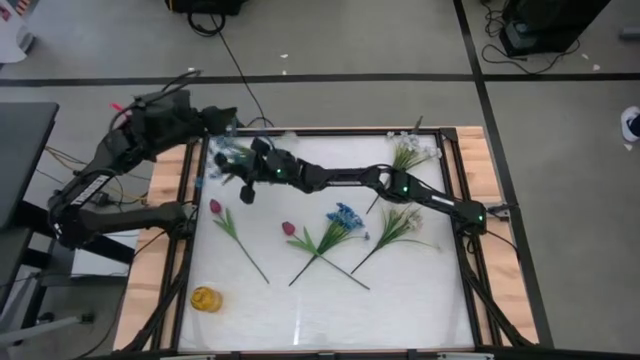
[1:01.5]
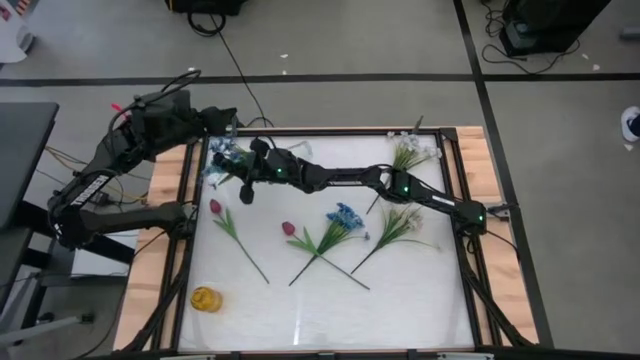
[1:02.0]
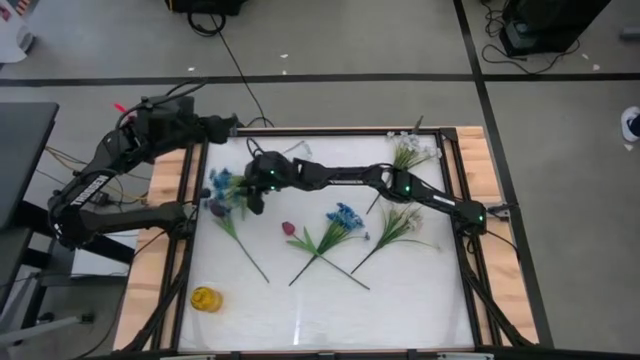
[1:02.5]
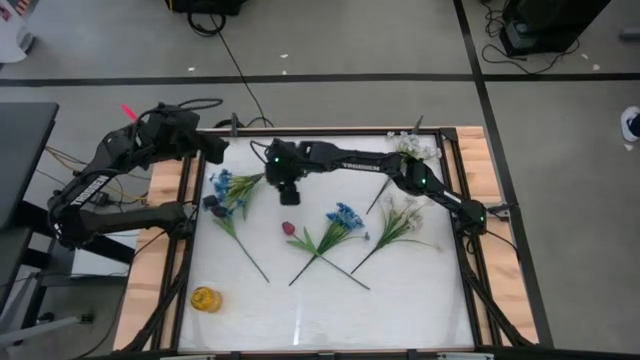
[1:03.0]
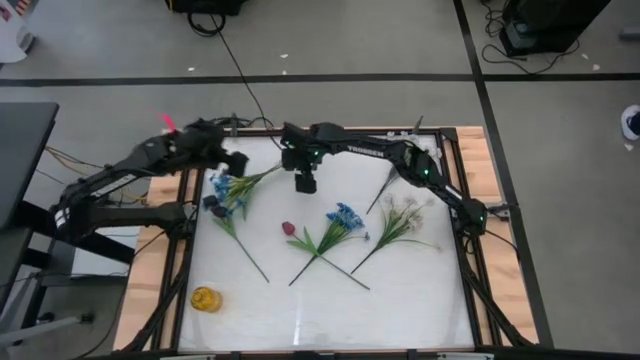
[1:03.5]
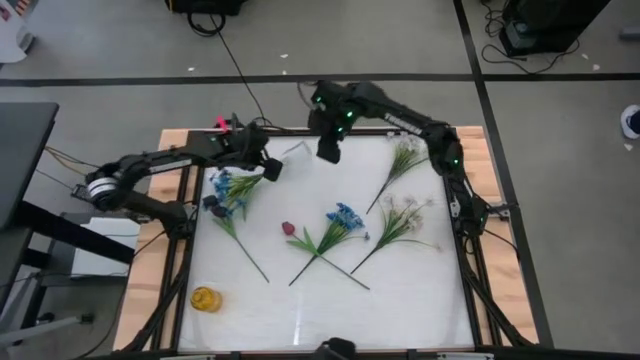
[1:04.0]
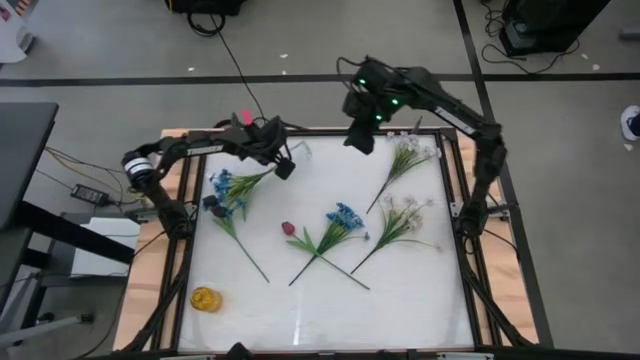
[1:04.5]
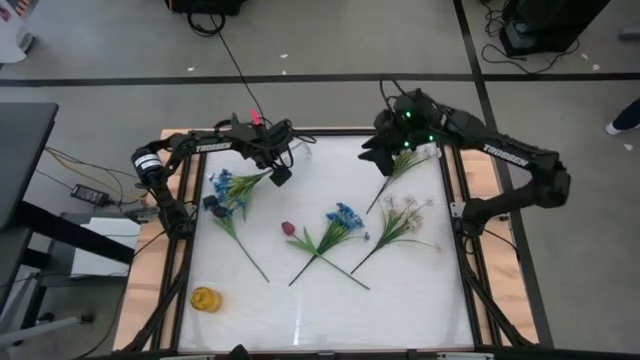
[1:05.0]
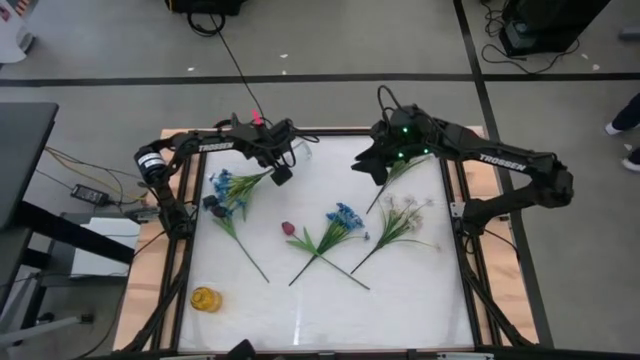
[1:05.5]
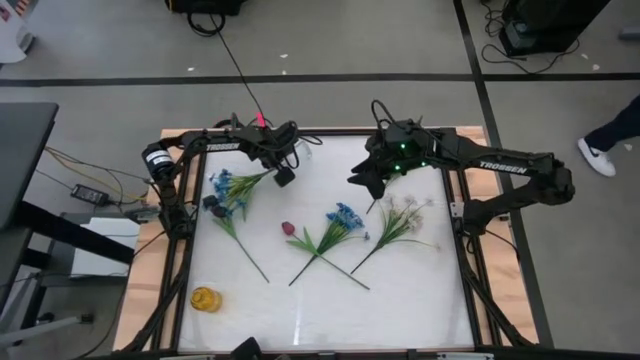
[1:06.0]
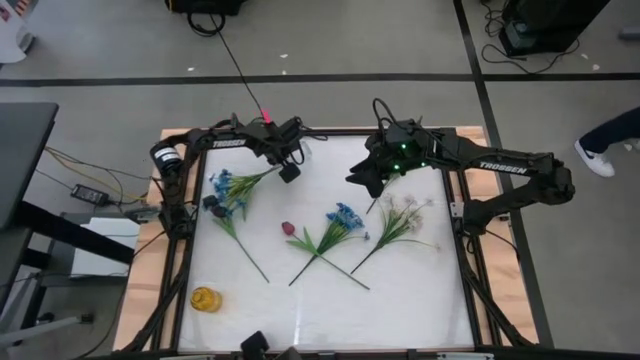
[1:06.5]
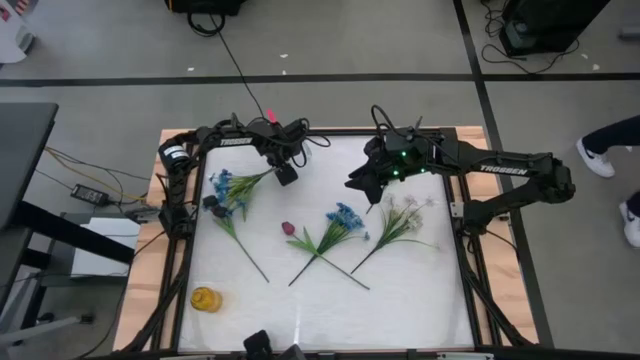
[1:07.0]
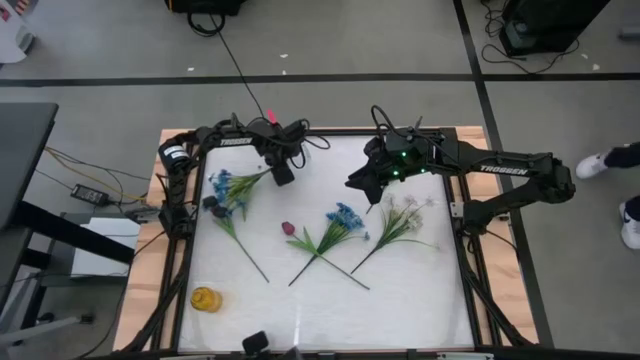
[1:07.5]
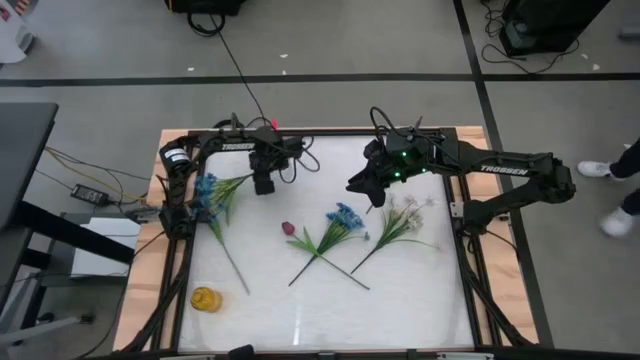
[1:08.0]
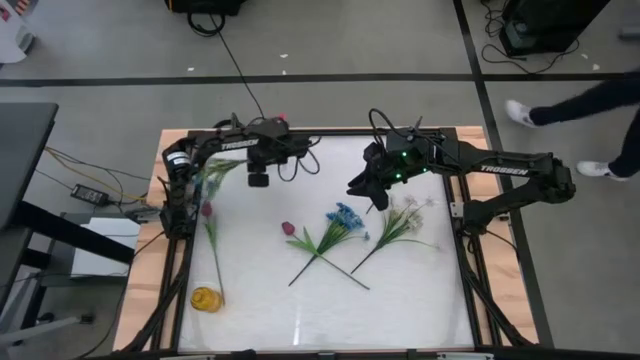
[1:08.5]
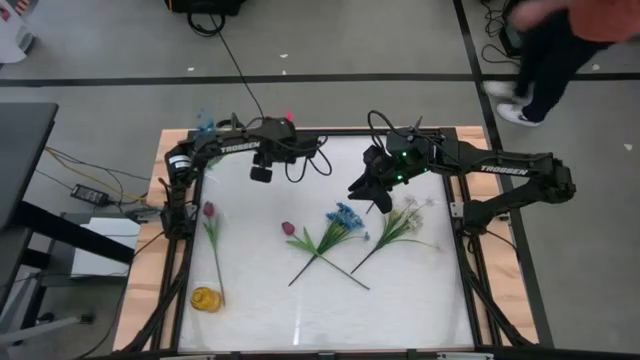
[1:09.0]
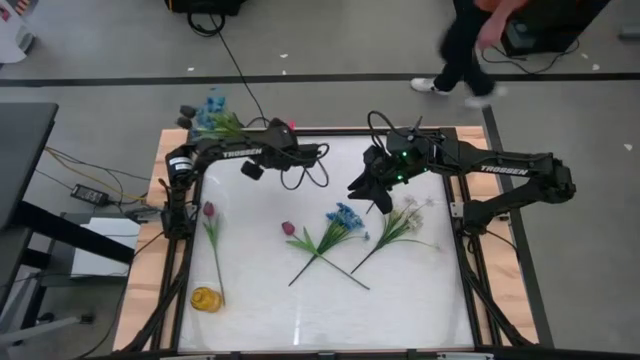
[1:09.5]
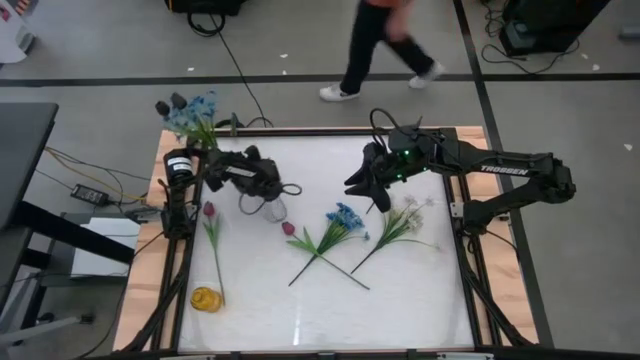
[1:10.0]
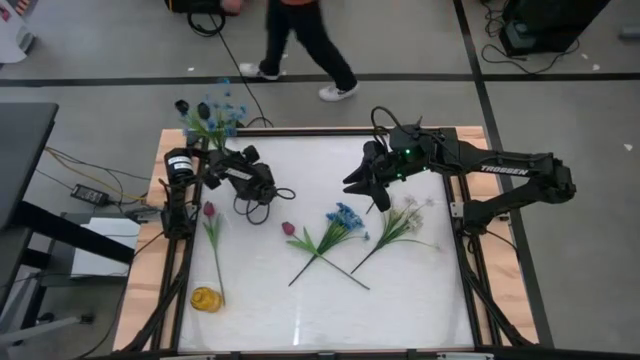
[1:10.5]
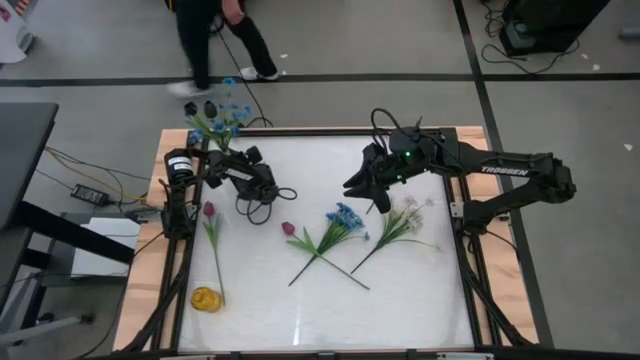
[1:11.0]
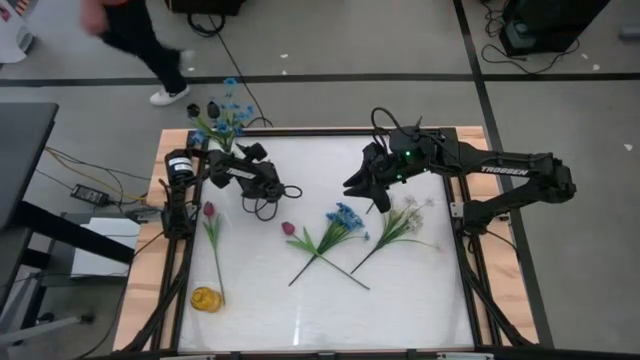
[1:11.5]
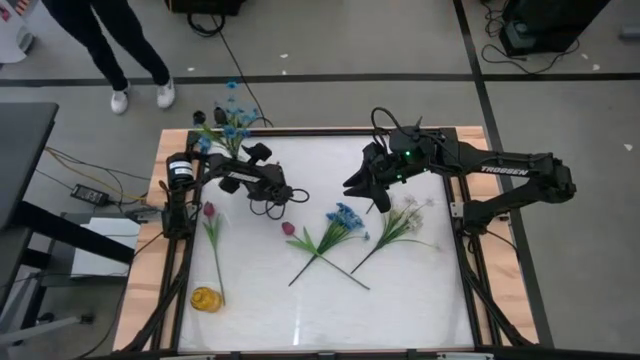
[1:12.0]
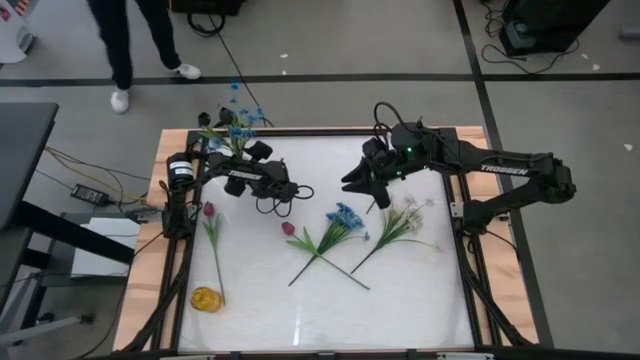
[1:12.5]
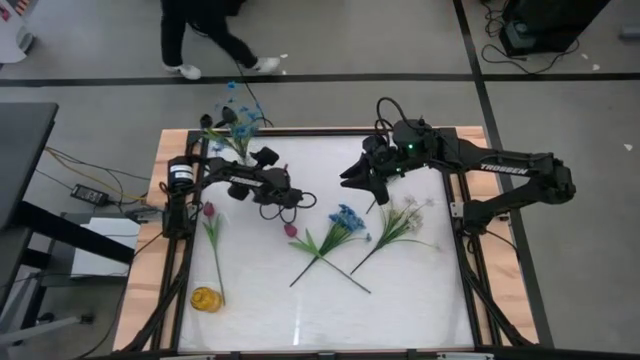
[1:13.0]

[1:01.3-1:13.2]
Task: Sort flowers into vase by color
Adjust the transparent vase

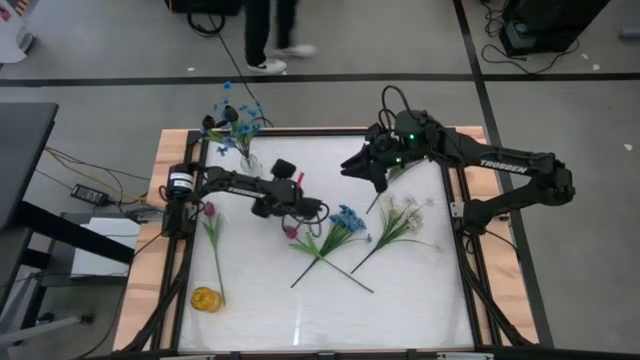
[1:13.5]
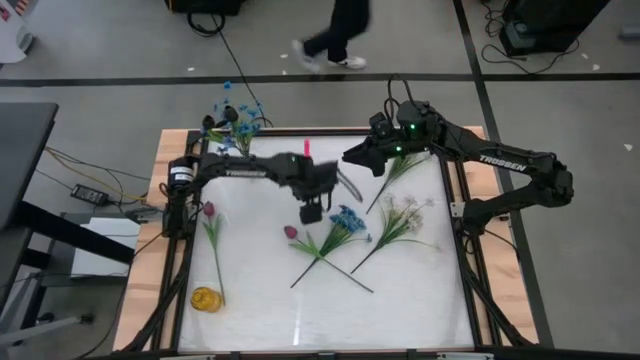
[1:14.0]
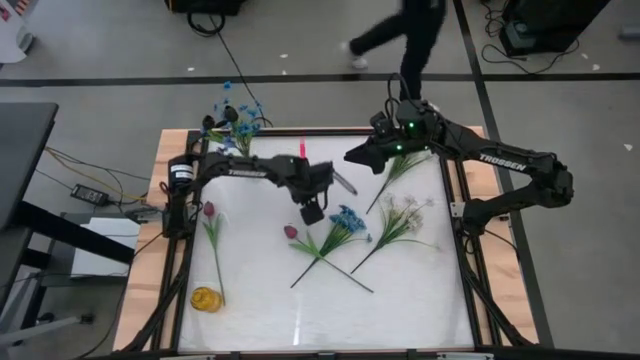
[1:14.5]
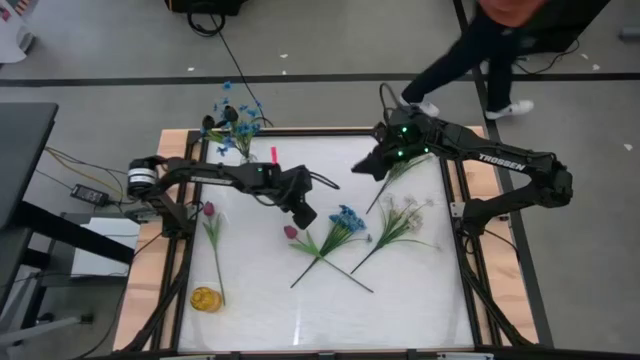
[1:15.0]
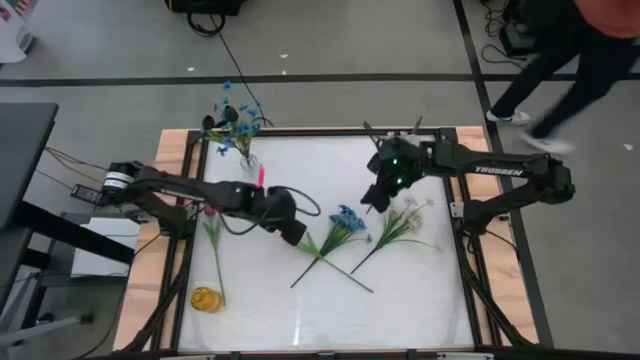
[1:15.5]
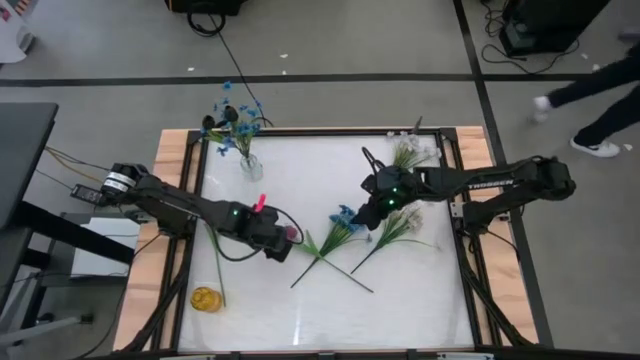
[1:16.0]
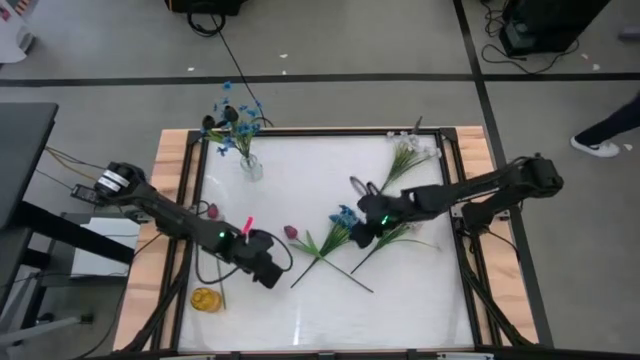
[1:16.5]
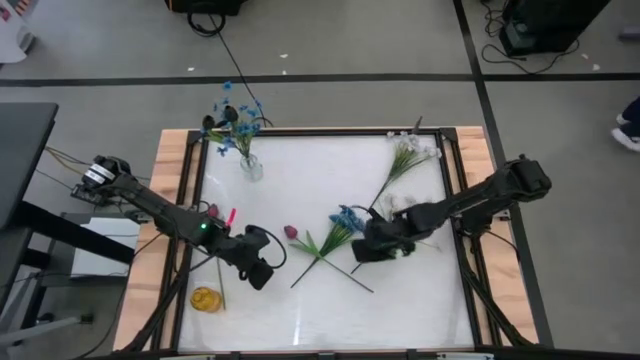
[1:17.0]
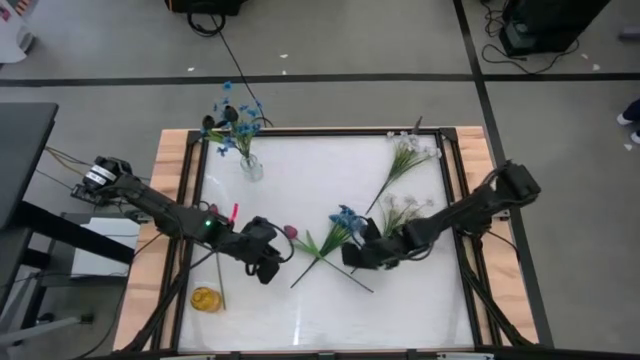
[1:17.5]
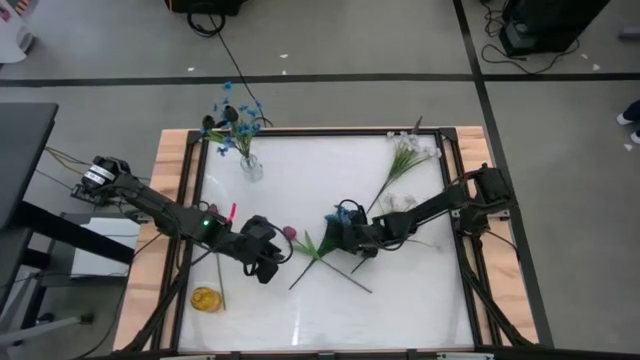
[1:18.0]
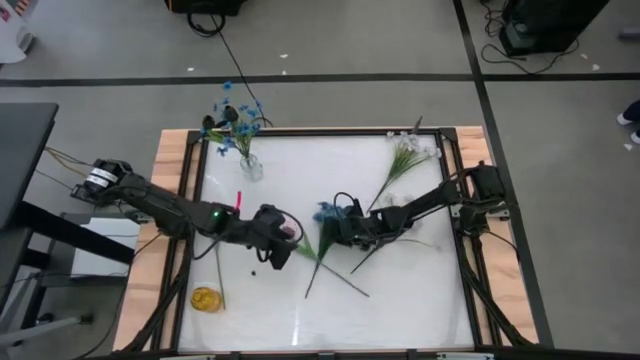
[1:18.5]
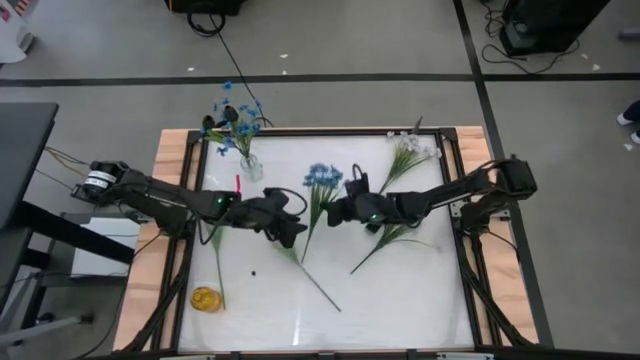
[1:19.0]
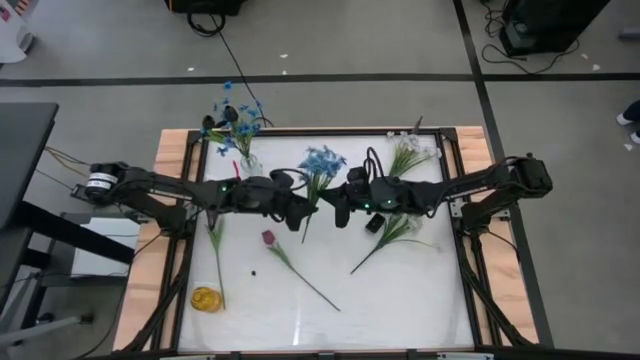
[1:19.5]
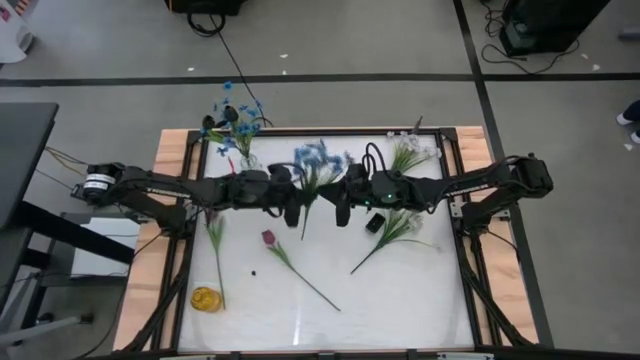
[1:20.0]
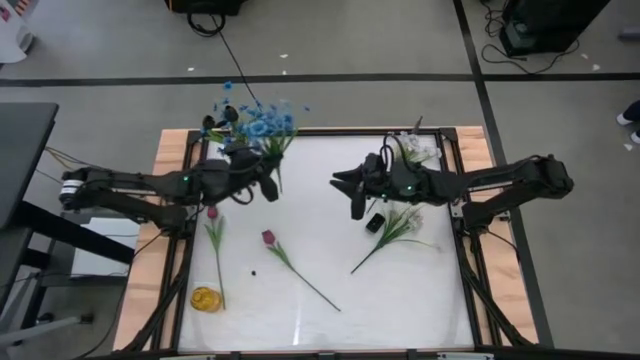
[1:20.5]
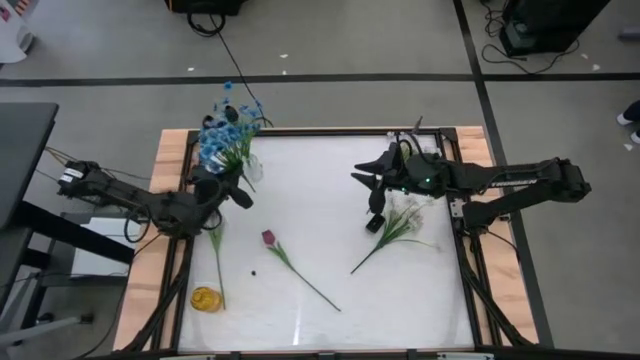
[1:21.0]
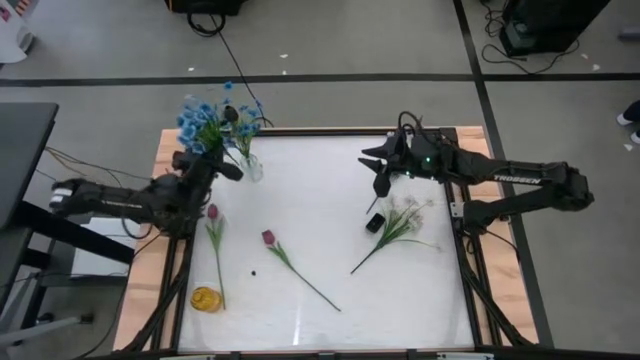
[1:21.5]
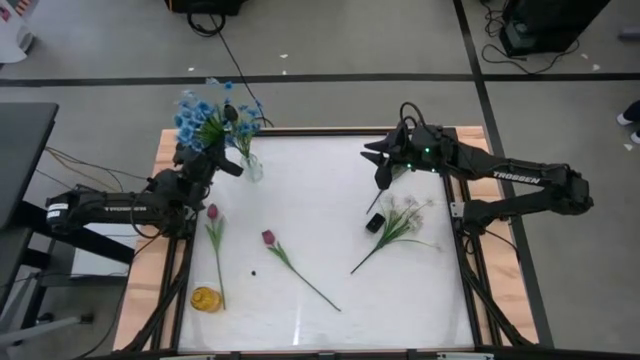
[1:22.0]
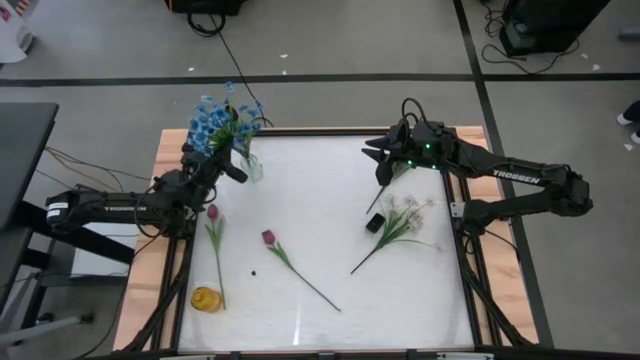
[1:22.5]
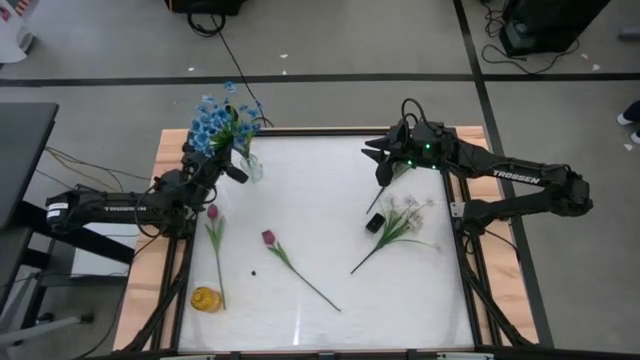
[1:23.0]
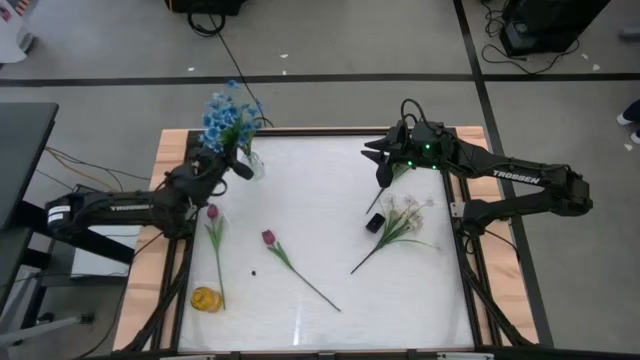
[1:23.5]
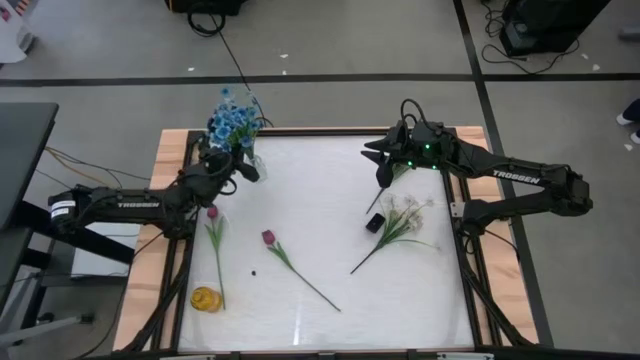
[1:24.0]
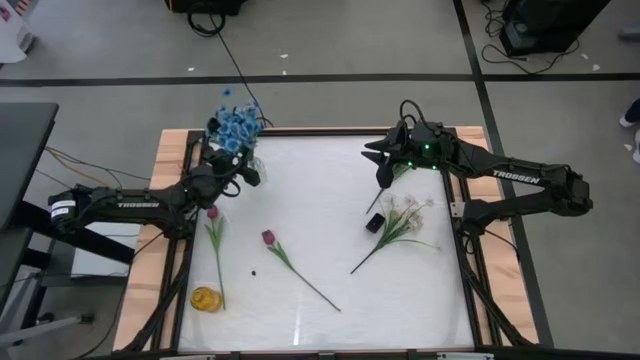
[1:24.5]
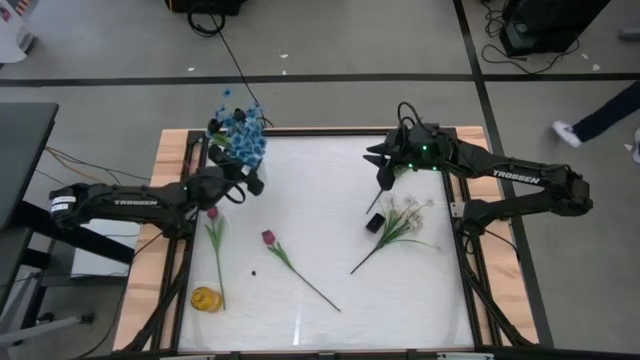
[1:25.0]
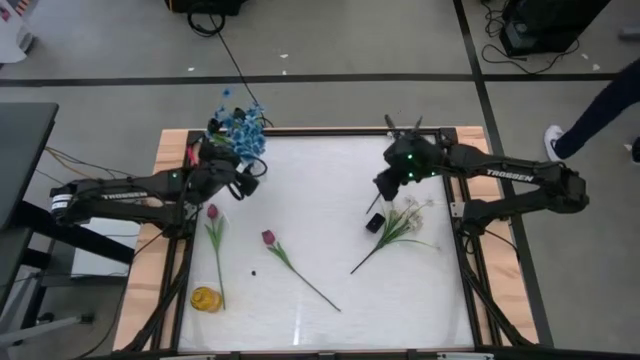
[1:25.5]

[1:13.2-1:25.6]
Put the blue flowers into the transparent vase
